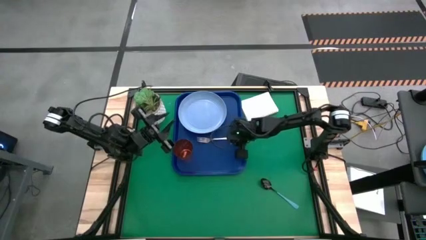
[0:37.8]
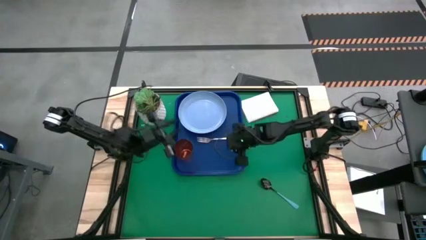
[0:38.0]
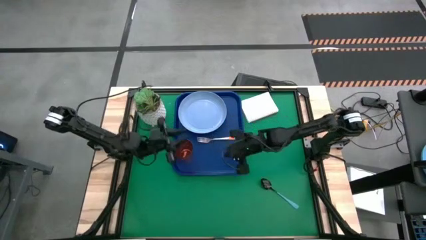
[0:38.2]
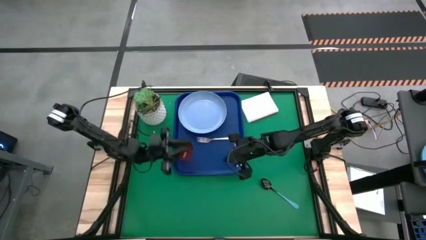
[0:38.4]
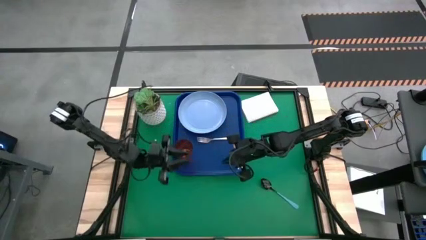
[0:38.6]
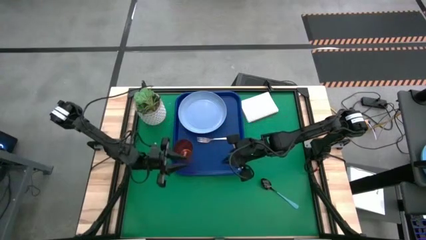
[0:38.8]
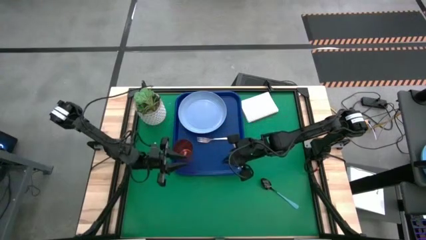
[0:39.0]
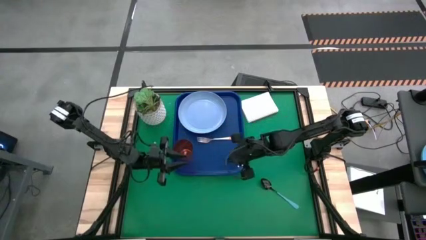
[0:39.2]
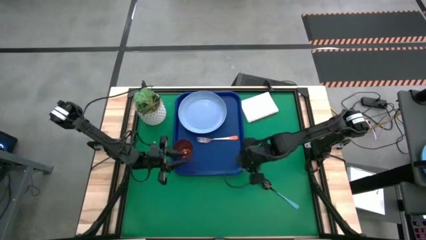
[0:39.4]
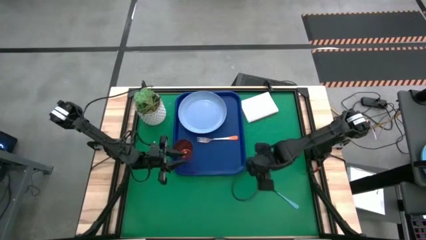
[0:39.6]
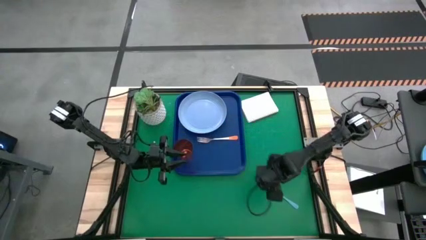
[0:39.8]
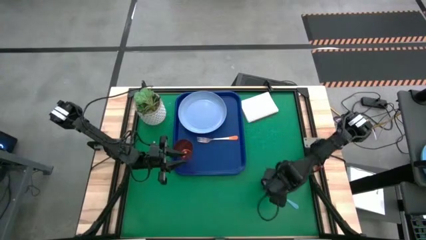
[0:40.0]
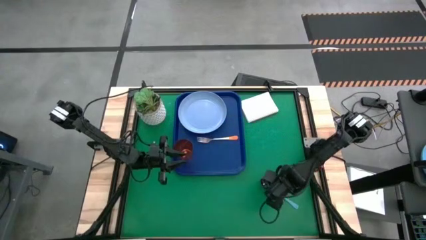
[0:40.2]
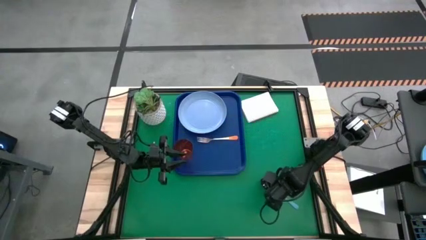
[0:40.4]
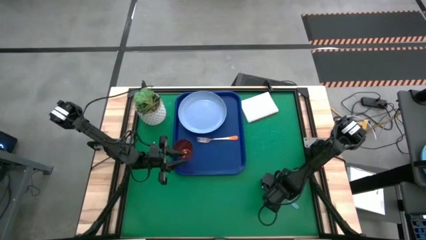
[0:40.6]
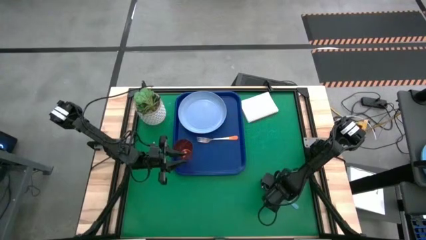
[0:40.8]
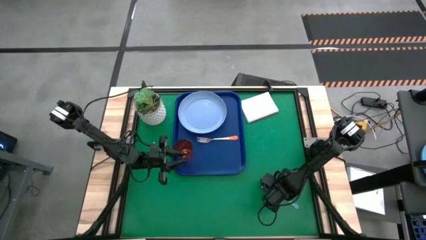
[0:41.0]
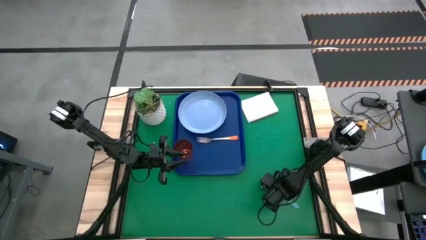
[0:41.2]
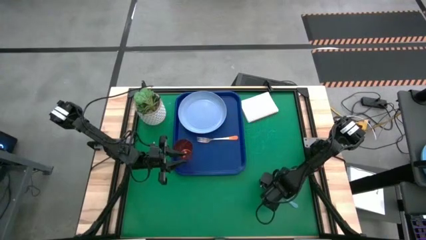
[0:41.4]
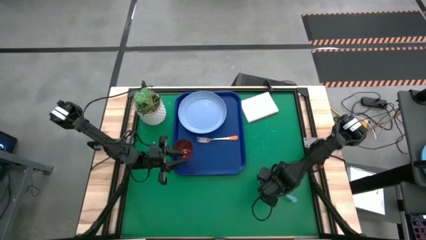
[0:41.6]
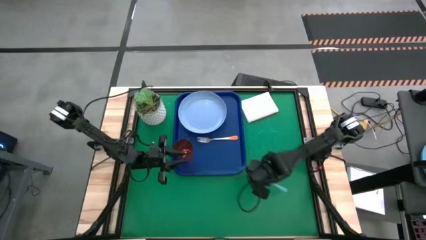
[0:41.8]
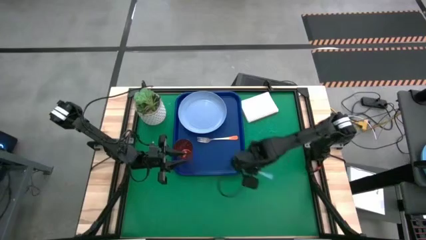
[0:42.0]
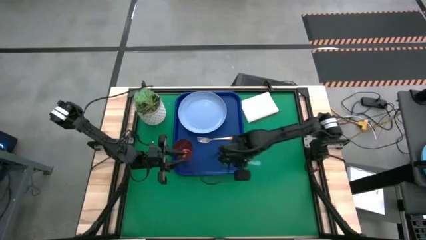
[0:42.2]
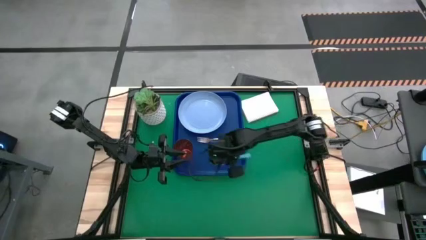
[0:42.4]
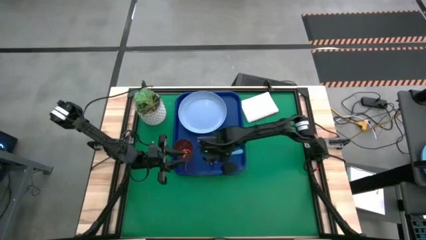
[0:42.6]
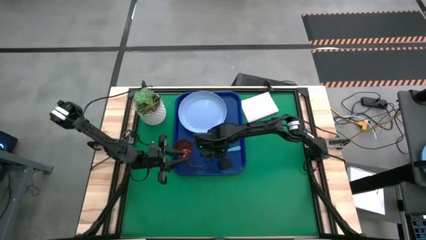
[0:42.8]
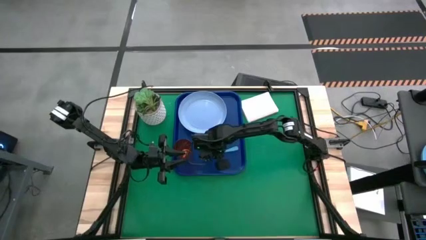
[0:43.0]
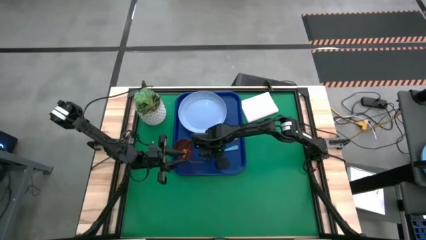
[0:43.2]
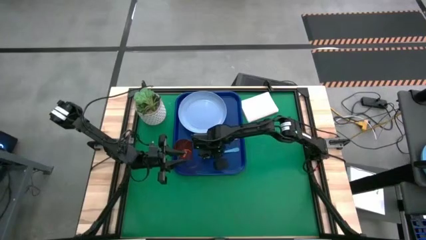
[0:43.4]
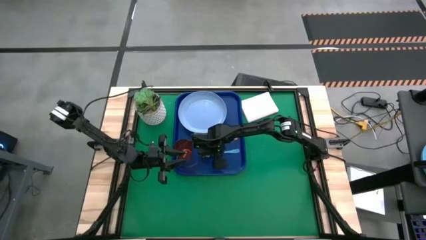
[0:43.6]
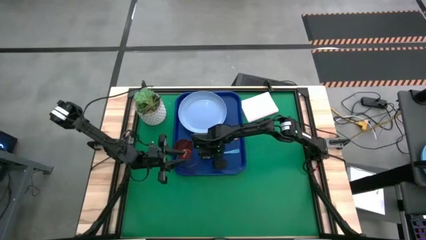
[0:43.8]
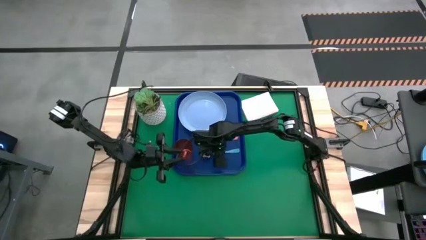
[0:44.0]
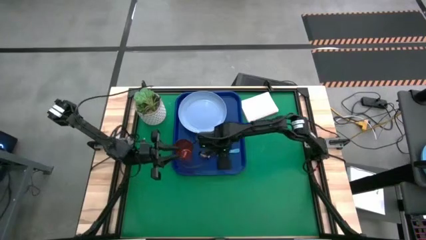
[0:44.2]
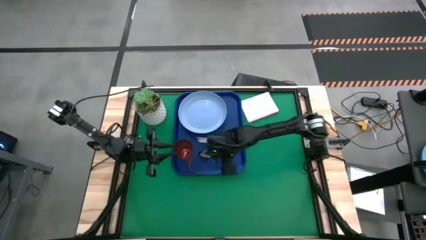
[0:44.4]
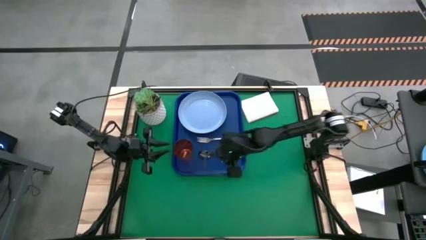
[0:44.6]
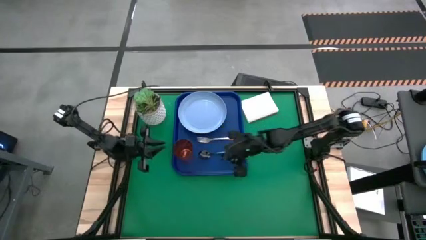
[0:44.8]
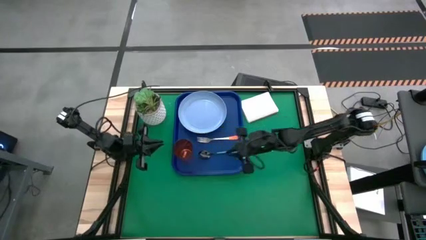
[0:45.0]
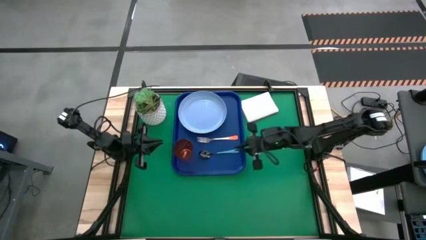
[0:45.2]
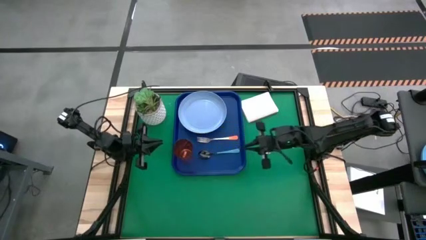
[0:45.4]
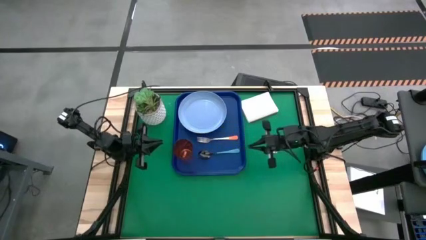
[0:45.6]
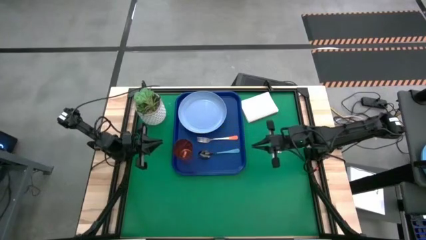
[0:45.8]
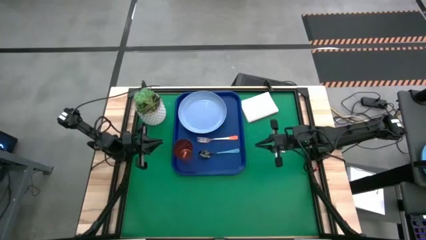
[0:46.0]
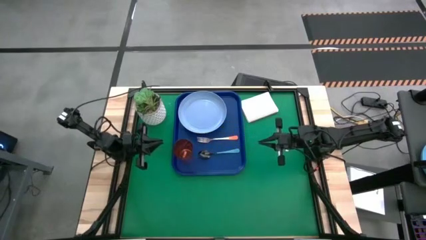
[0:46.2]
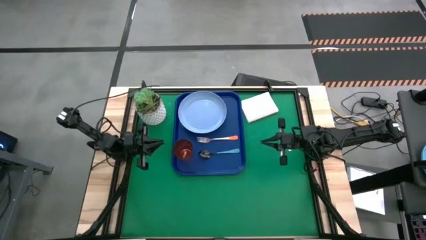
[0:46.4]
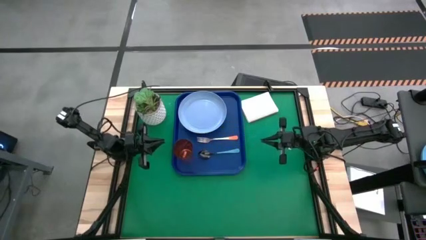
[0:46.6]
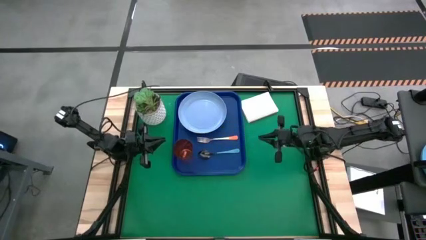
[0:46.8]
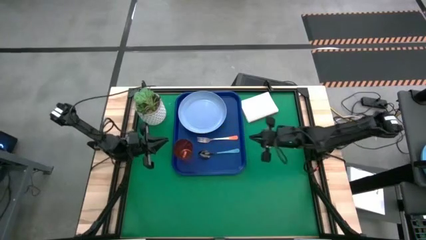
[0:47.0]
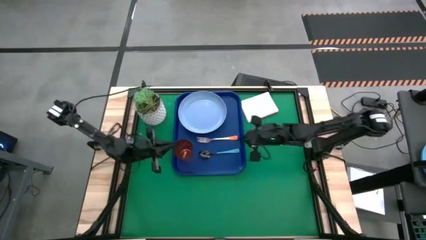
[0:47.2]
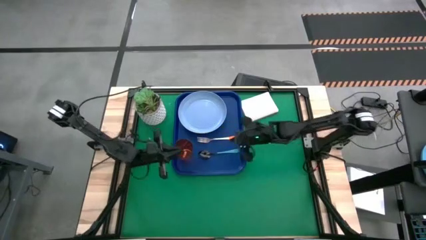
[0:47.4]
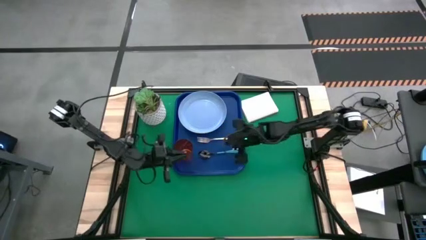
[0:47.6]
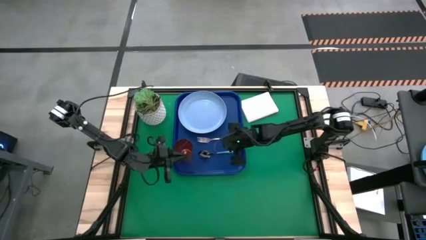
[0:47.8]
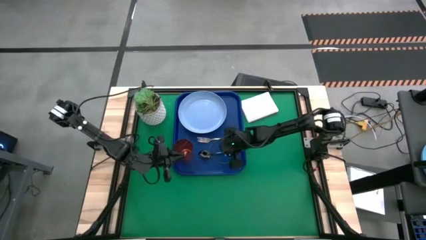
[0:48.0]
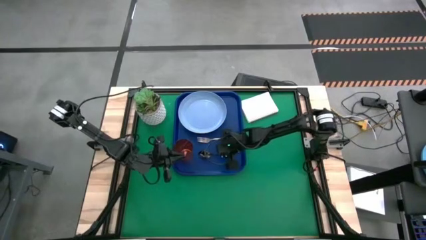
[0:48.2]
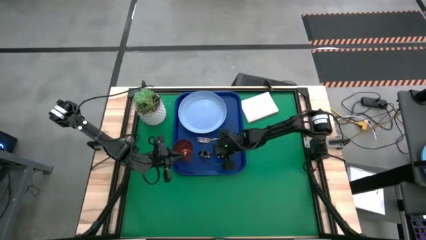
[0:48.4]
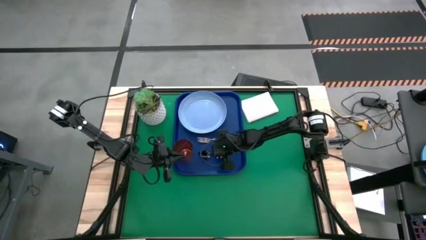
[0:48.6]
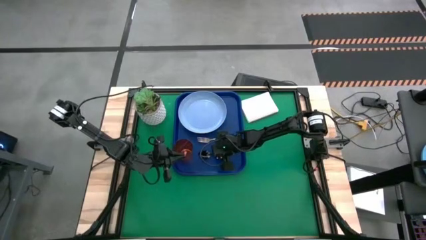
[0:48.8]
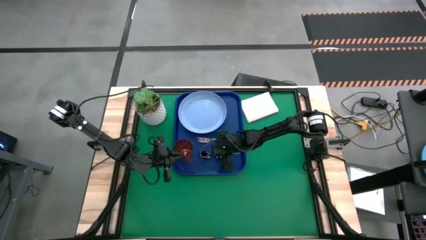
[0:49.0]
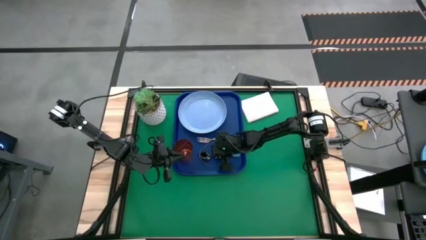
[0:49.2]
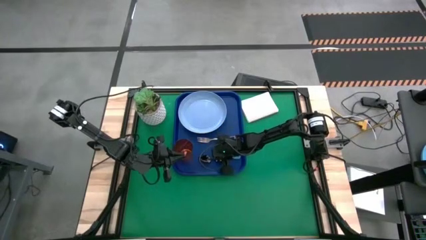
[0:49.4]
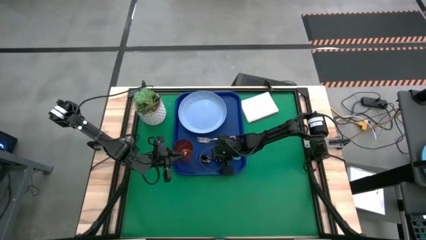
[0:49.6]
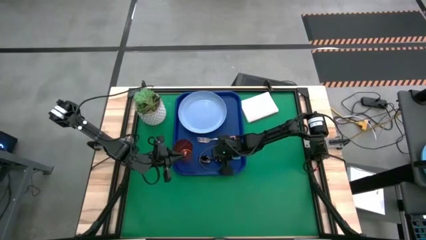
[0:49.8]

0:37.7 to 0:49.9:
Task: Pick and place plate/cup/fork/spoon on tray
Put the blue spoon on the blue tray to the left of the orange fork

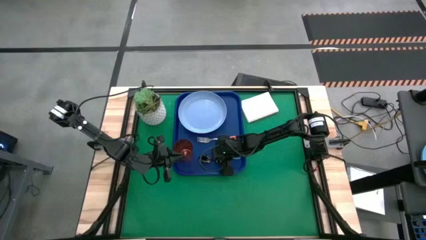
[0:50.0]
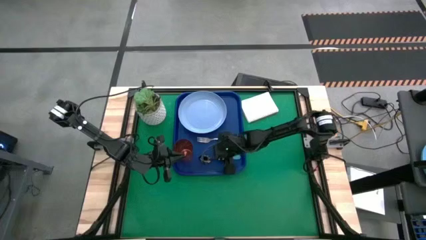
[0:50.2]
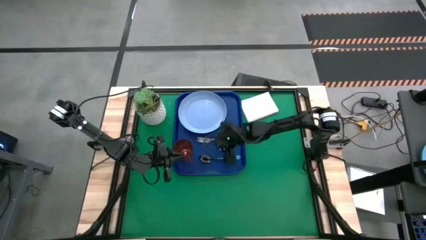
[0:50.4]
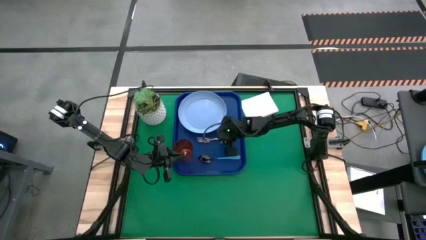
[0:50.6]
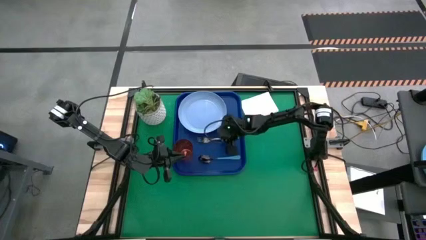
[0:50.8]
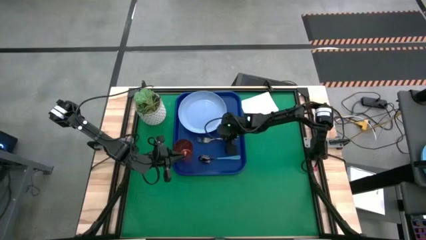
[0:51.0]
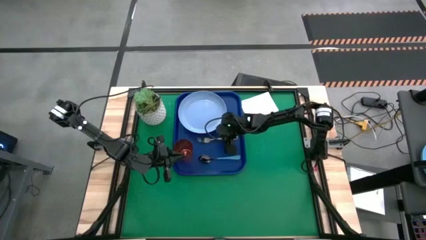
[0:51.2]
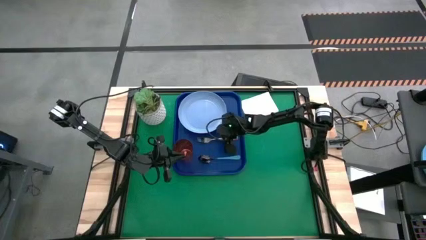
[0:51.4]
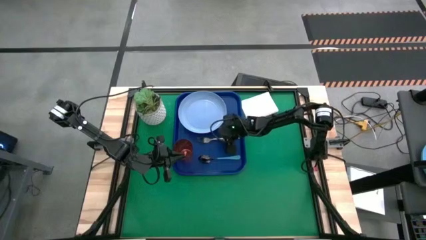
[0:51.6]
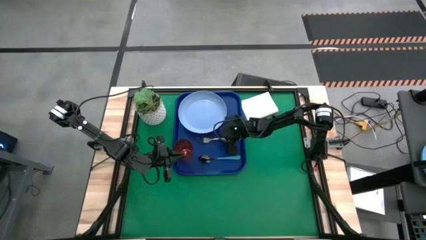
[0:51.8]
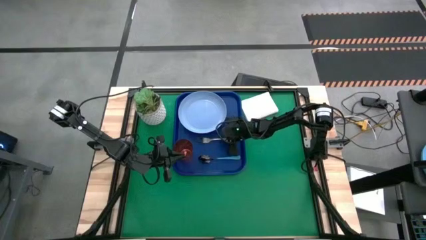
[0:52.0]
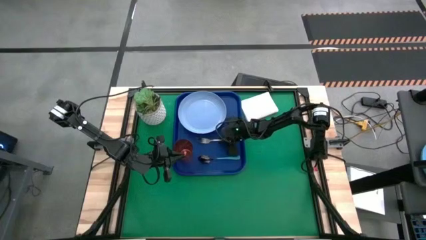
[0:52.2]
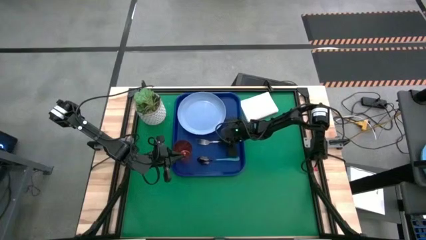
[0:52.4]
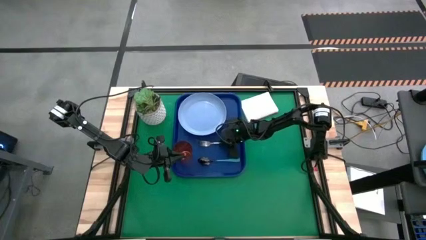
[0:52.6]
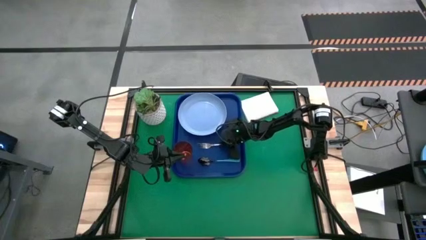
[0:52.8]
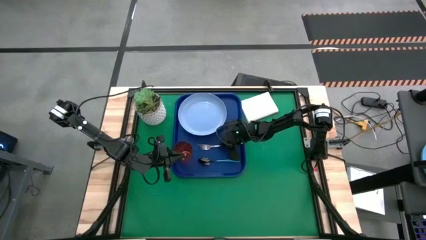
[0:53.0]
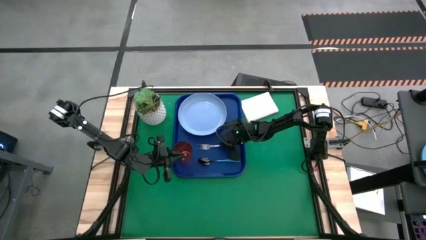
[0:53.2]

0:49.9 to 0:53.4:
Adjust the orange fork on the blue tray

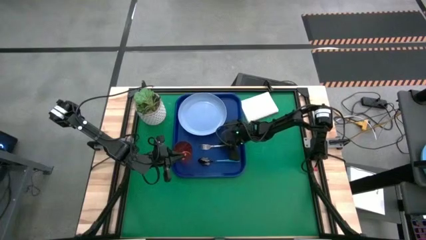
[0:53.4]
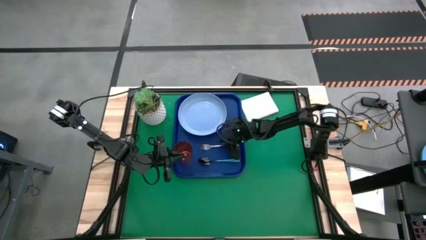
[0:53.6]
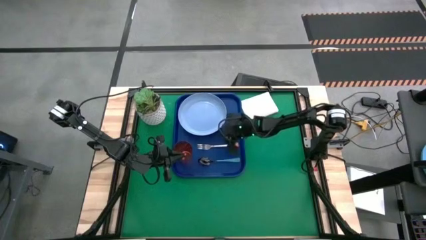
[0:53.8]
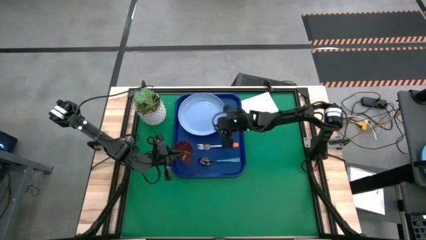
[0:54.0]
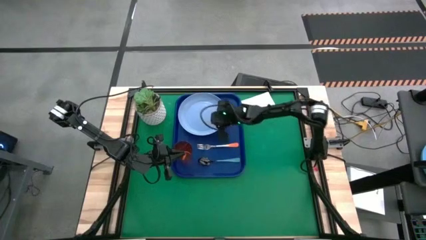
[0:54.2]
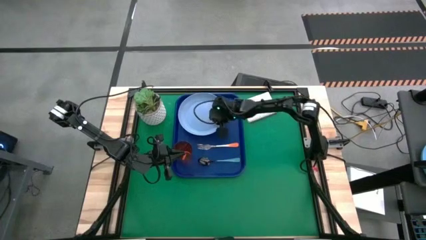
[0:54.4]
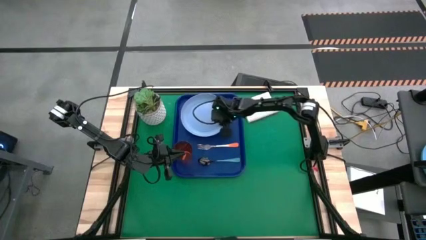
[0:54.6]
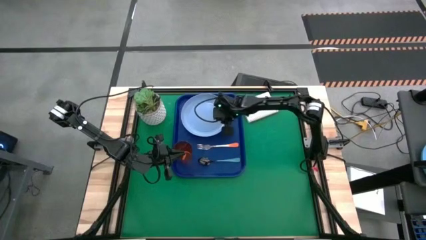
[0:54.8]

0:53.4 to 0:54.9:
Adjust the light blue plate on the blue tray
